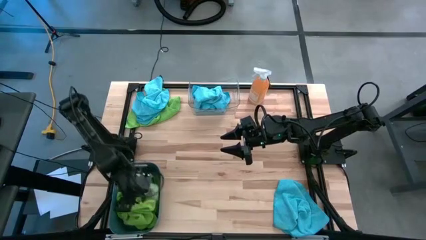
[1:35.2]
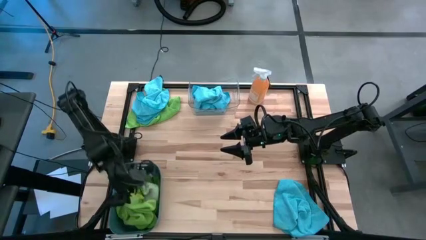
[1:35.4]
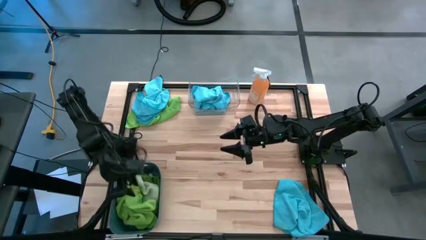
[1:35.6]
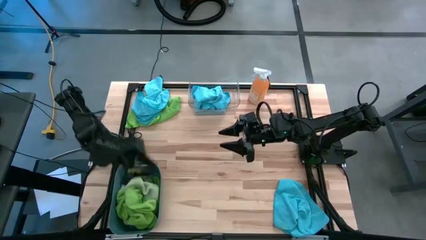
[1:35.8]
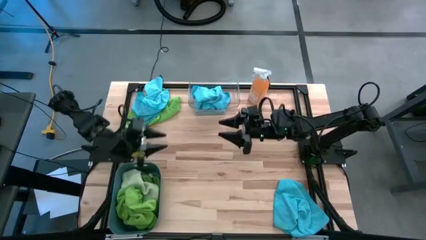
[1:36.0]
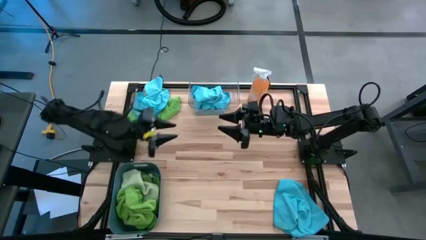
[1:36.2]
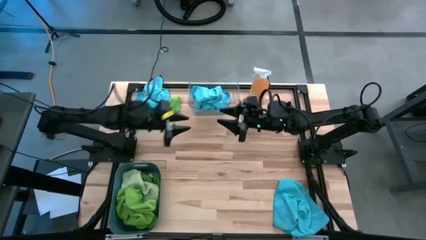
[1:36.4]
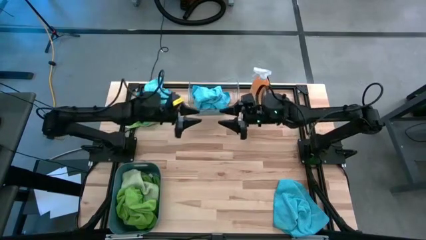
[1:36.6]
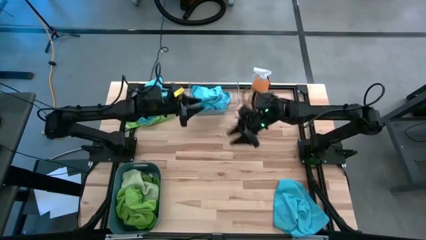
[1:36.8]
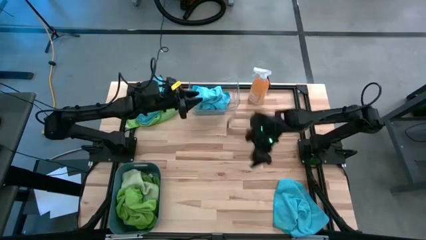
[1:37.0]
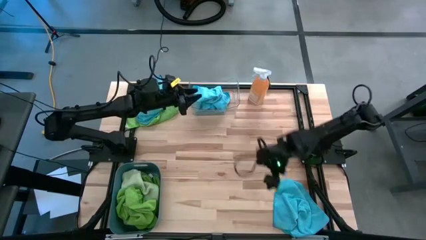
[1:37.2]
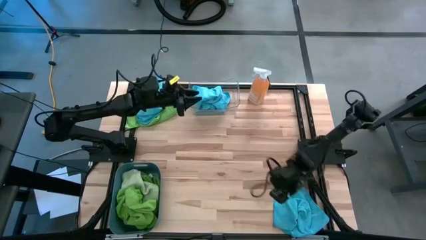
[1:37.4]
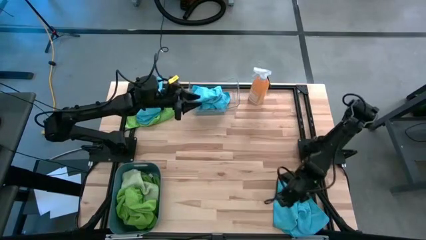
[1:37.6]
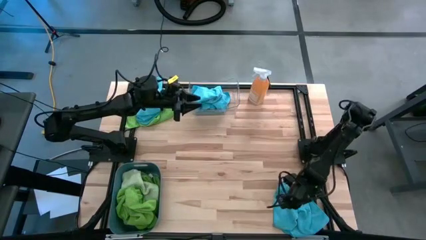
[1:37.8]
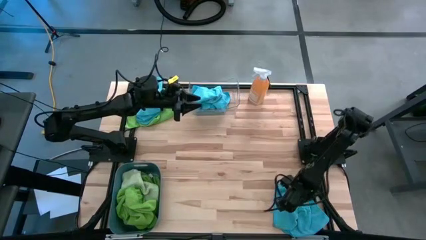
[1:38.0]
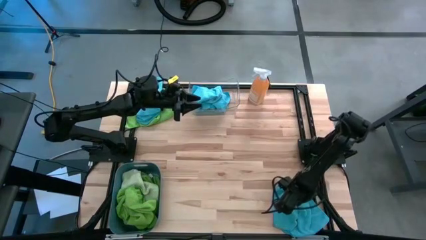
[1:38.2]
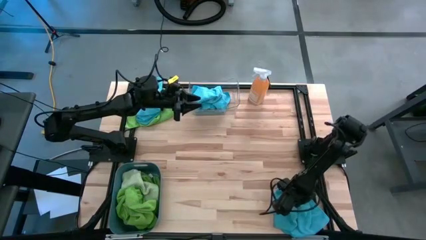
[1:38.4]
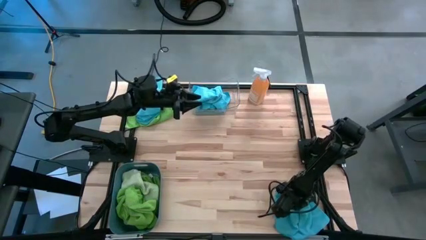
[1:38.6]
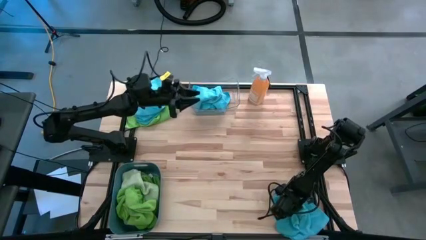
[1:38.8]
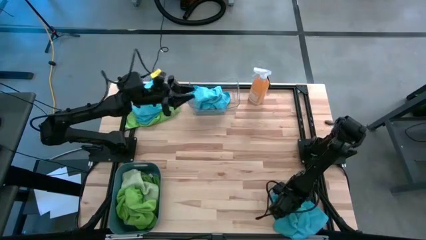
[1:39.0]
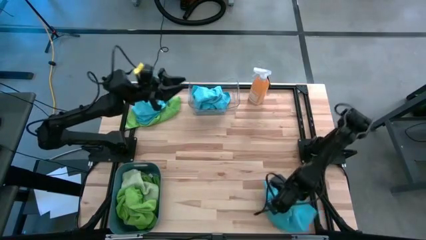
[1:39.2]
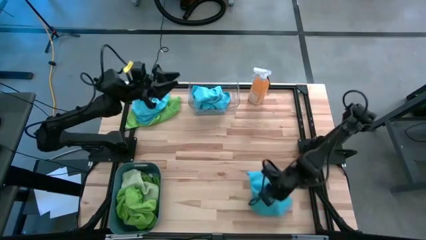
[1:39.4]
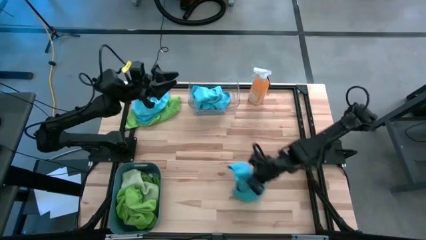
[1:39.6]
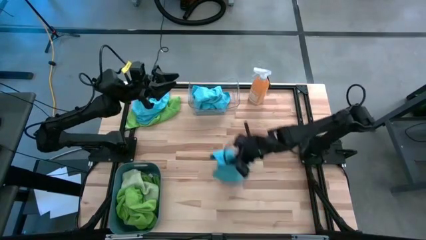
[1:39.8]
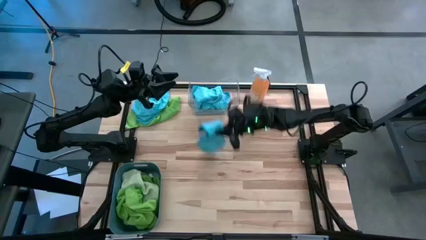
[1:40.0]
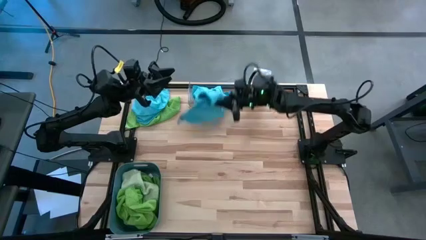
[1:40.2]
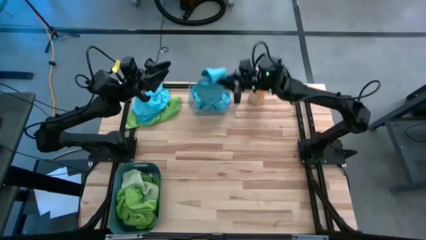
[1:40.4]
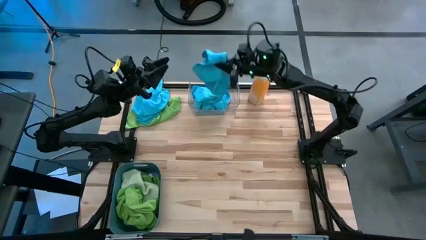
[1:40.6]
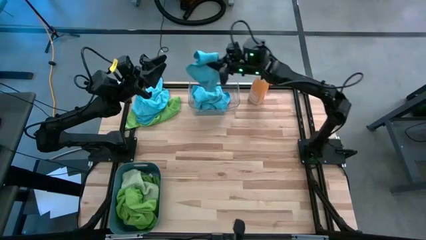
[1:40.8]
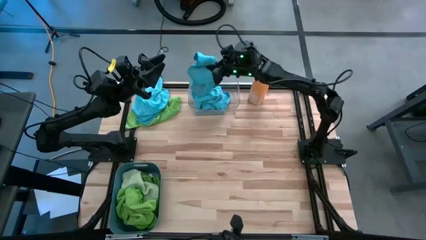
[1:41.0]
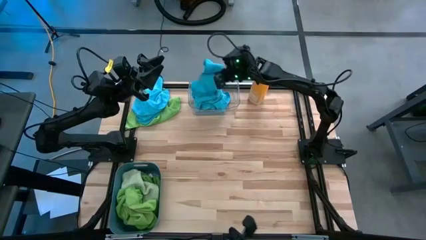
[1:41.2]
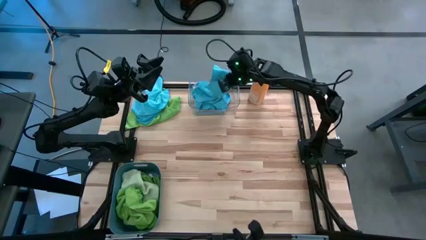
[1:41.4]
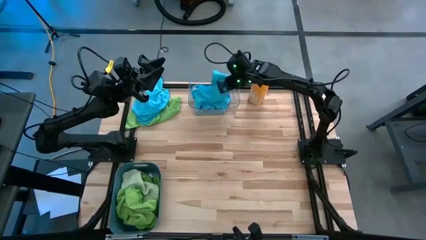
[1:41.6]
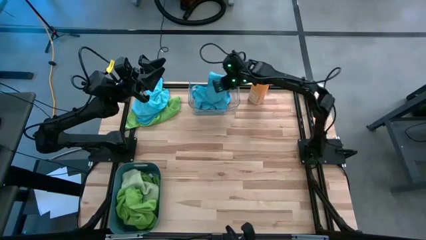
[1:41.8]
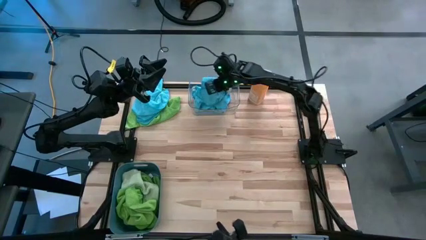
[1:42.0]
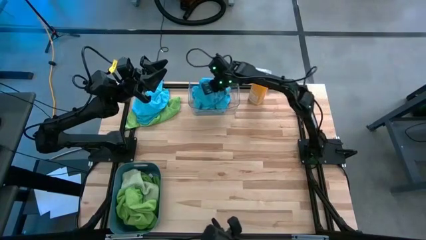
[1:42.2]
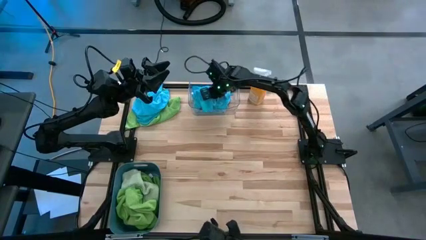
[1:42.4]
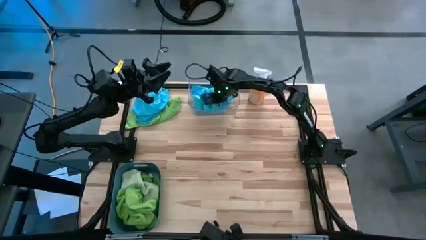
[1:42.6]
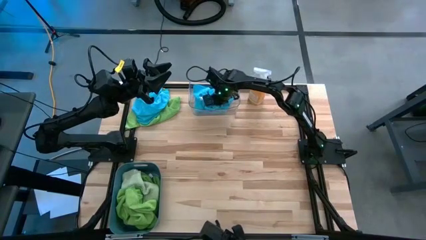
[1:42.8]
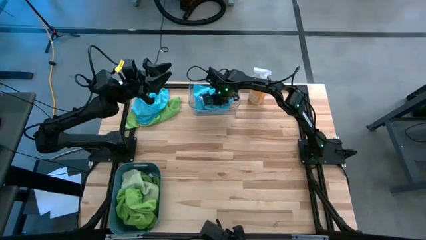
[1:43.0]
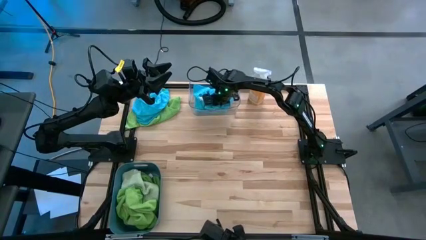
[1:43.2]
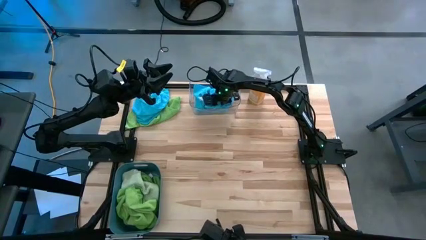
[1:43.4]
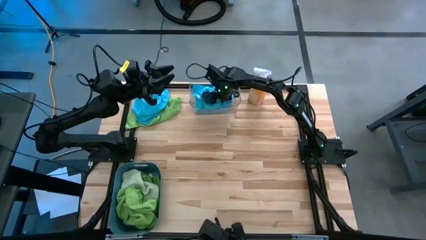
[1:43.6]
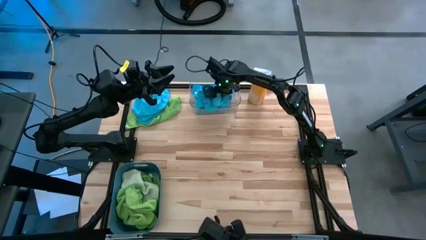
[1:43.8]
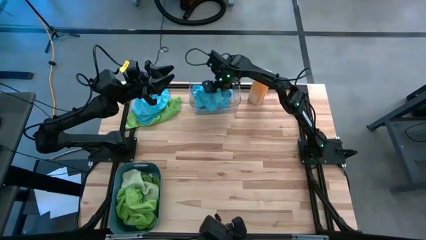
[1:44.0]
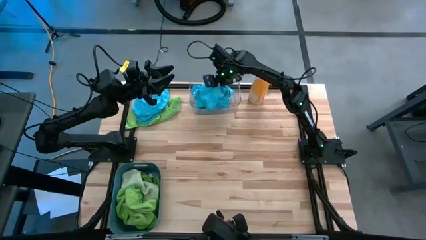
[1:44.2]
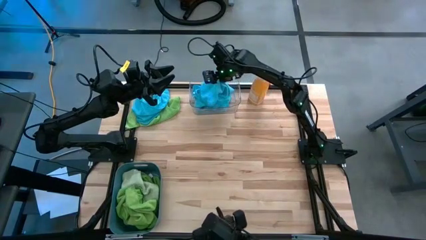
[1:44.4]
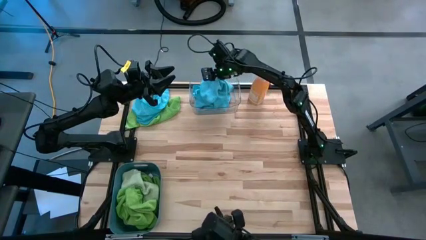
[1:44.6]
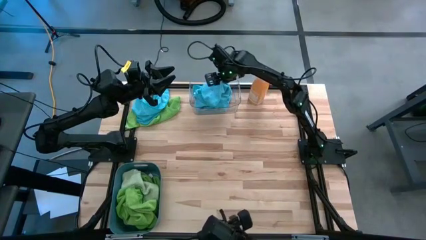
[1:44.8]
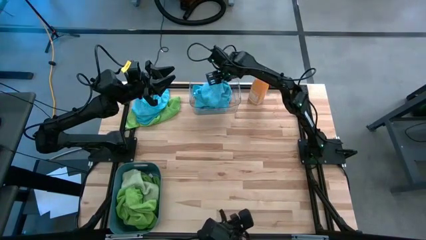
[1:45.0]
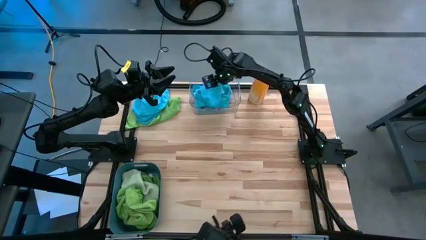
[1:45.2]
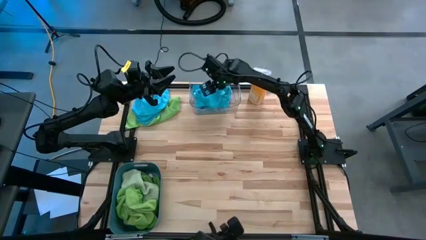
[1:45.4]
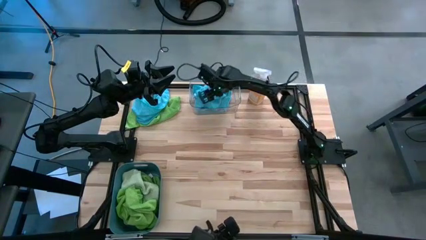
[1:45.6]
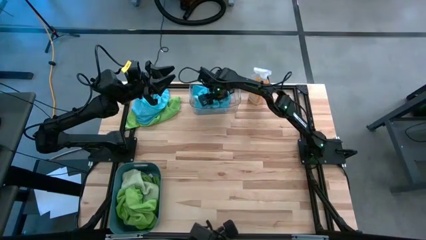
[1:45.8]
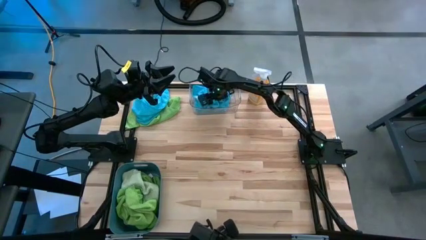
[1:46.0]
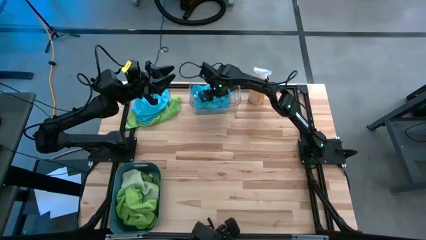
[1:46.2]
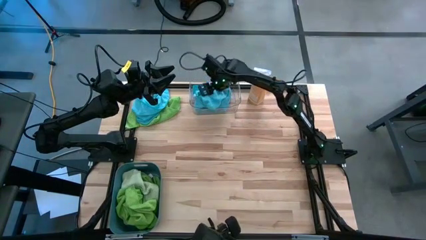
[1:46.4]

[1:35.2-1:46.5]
Task: Sort microfiber towel by color & place in baskets
Put the blue microfiber towel into the transparent bin

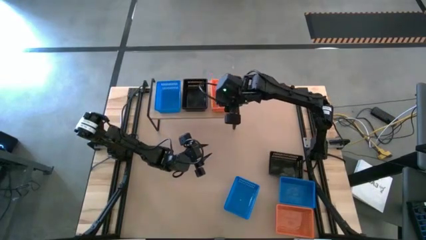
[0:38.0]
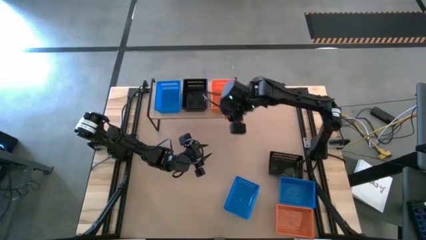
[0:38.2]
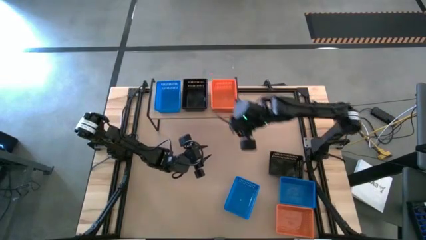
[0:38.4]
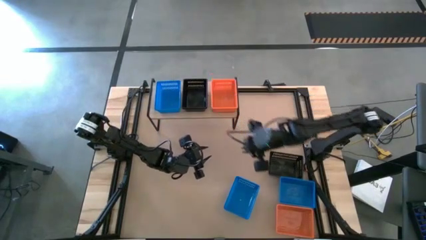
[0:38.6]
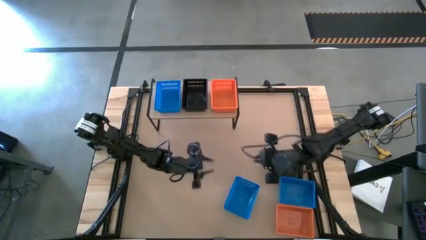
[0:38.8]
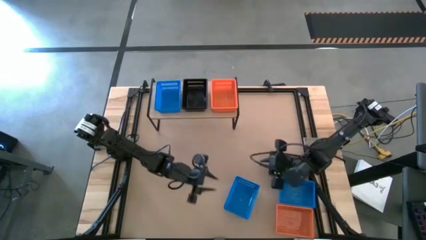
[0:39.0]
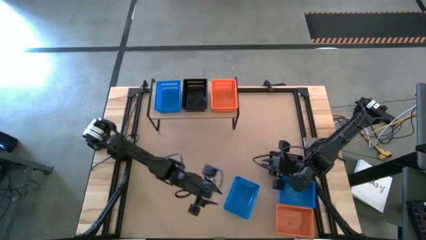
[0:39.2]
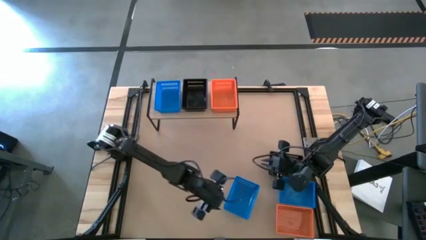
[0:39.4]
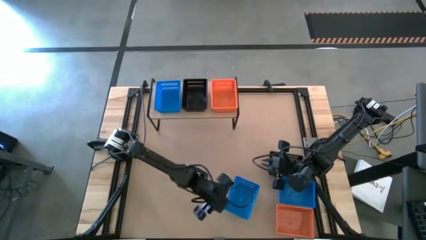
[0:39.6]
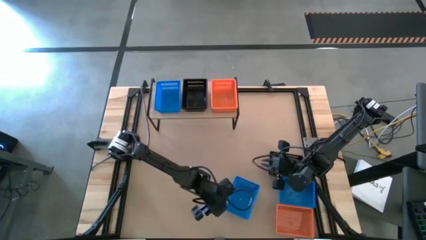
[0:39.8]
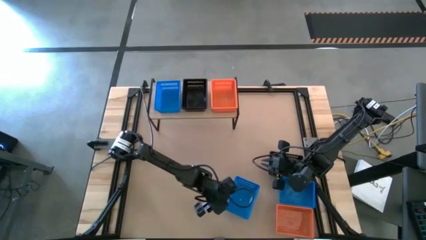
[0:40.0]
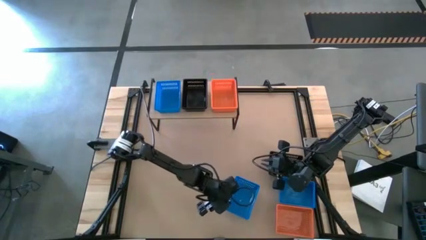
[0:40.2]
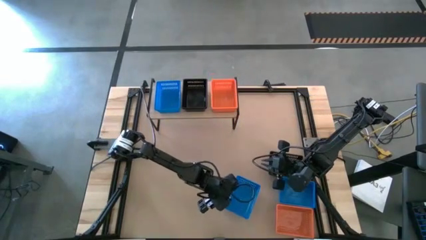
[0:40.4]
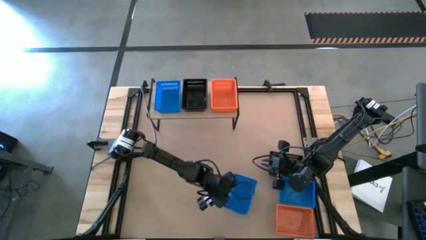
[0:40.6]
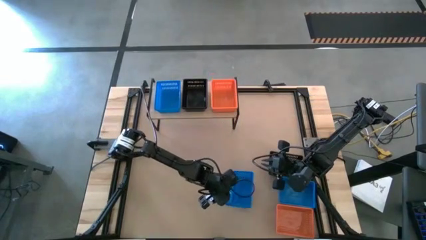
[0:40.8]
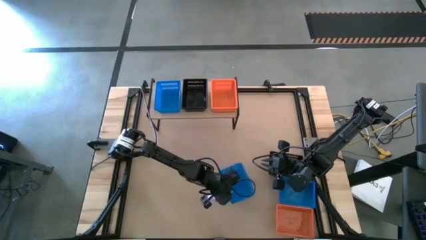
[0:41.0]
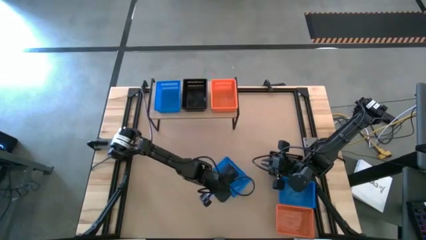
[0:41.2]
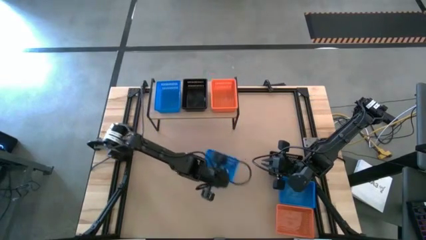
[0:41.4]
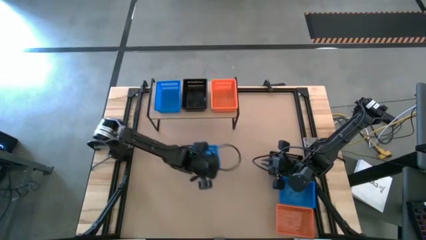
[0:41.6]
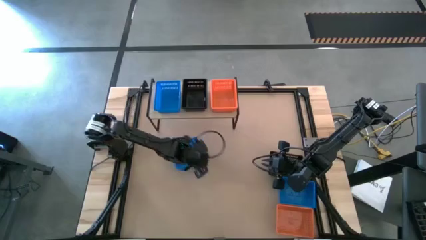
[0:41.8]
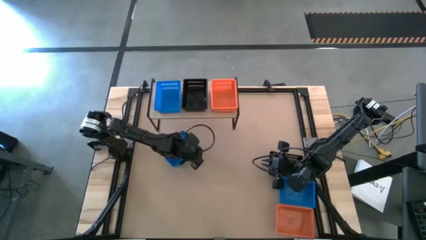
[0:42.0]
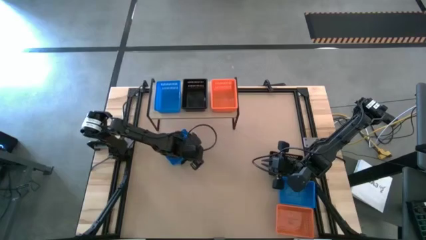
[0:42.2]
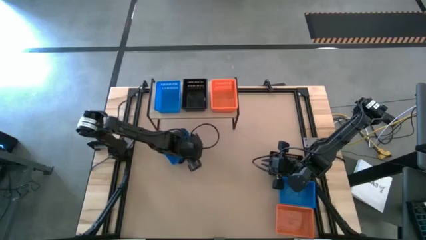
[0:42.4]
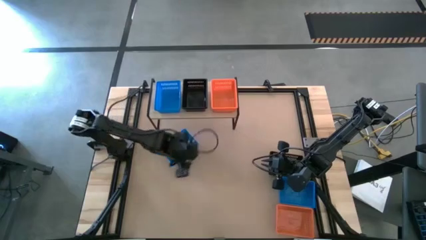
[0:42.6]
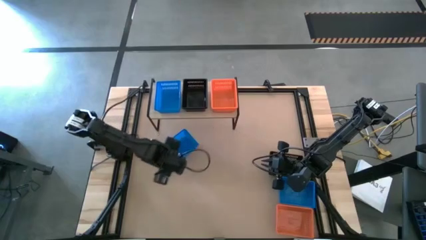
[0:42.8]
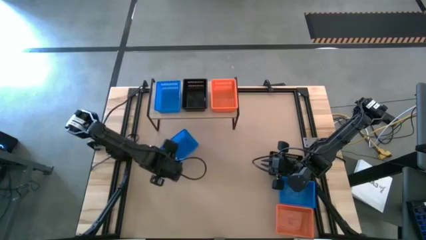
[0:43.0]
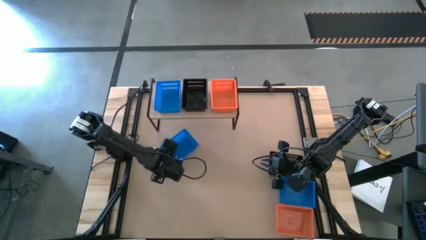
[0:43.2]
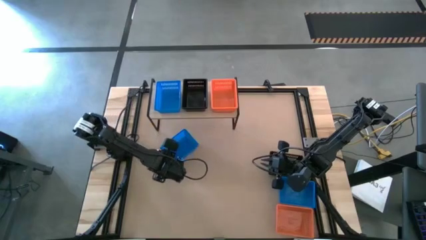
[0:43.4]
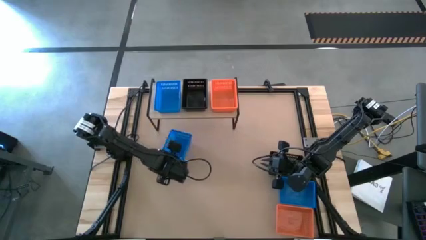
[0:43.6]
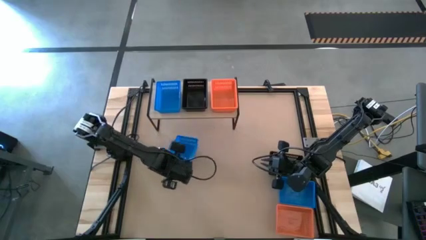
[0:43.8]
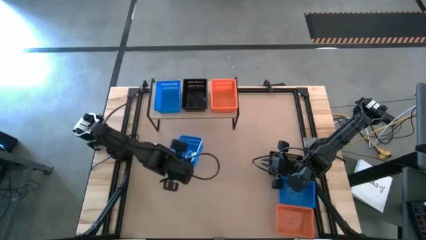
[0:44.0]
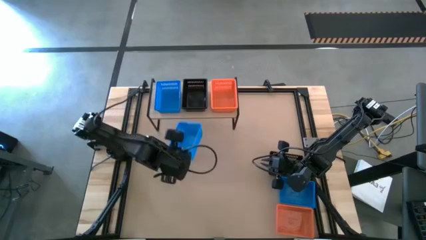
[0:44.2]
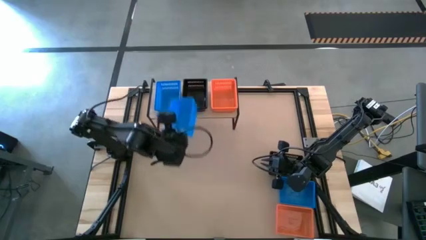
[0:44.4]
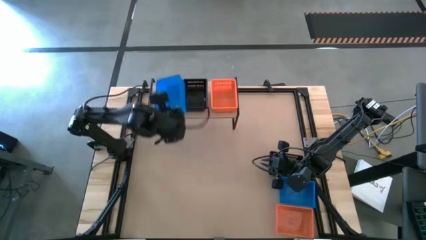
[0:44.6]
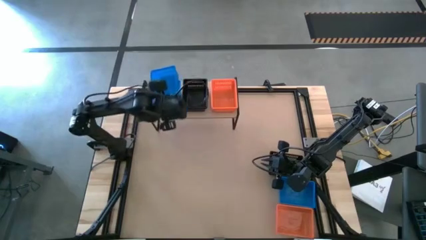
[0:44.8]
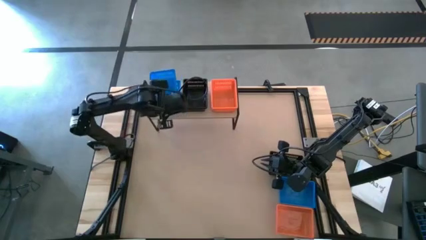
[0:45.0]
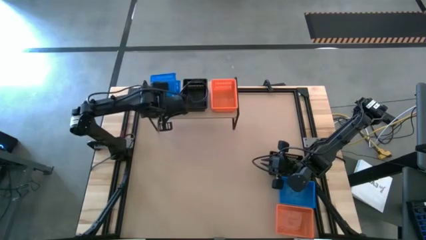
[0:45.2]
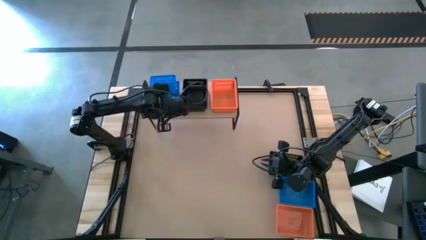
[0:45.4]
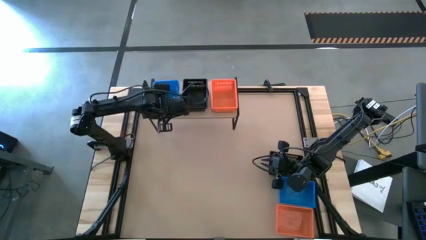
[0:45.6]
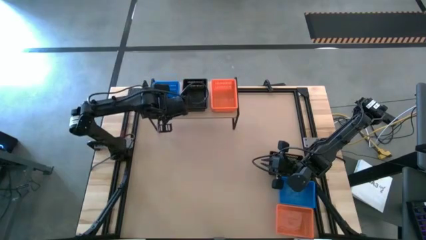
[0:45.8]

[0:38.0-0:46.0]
Task: Stack baskets on shelf by color
Stack the left blue basket on top of the blue basket on the shelf
